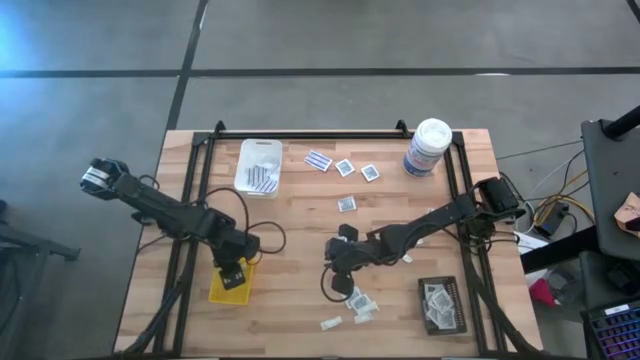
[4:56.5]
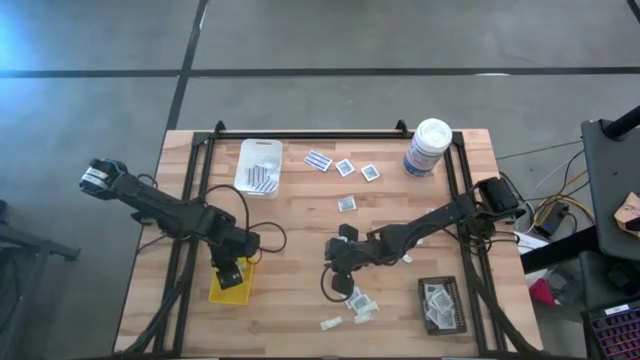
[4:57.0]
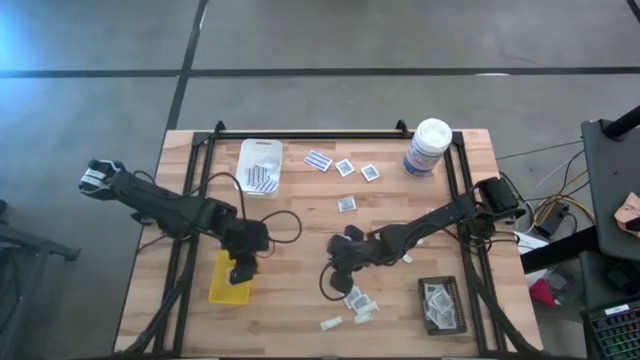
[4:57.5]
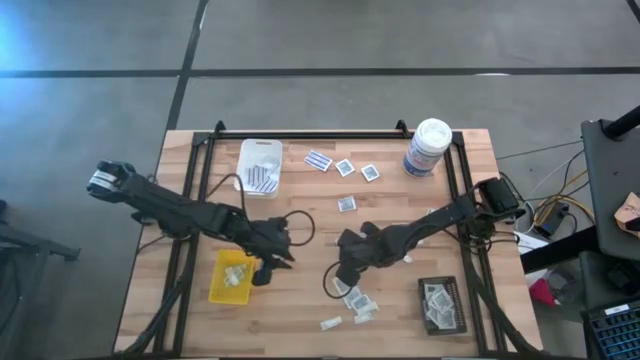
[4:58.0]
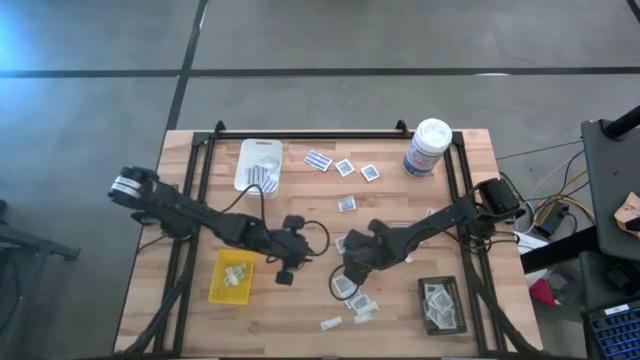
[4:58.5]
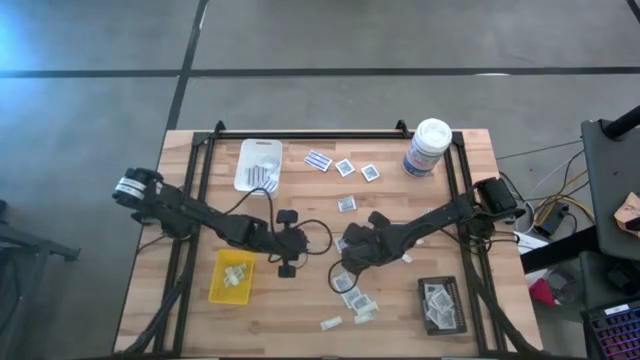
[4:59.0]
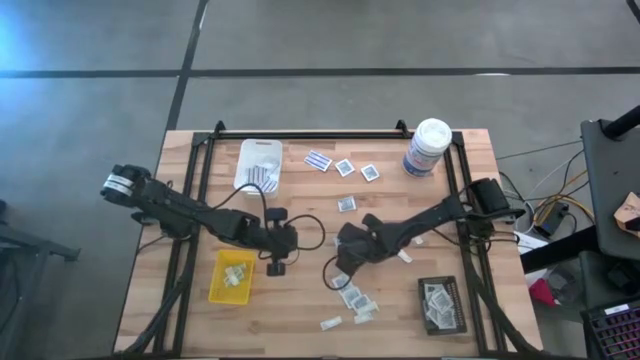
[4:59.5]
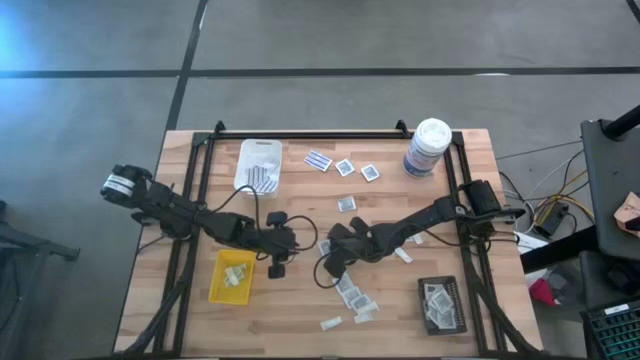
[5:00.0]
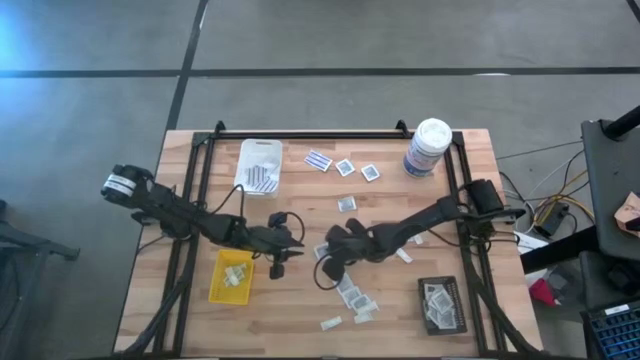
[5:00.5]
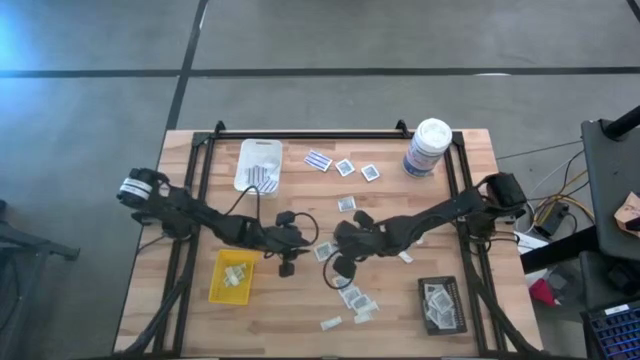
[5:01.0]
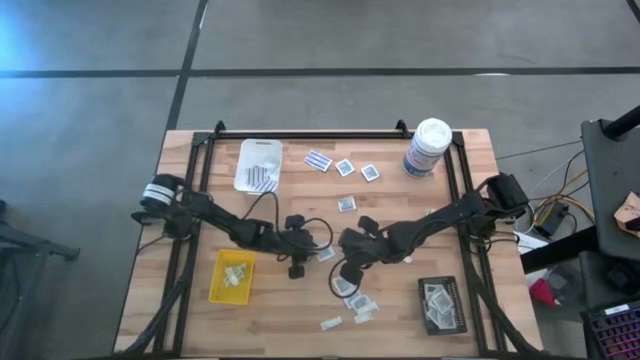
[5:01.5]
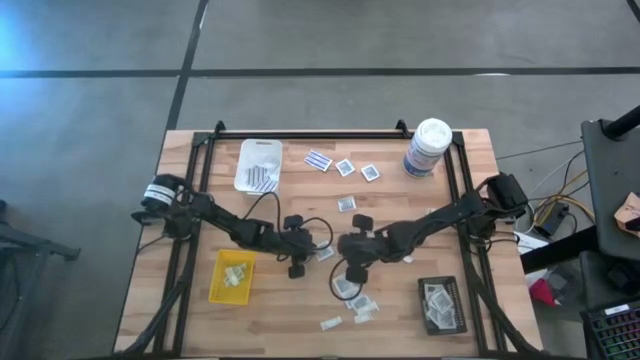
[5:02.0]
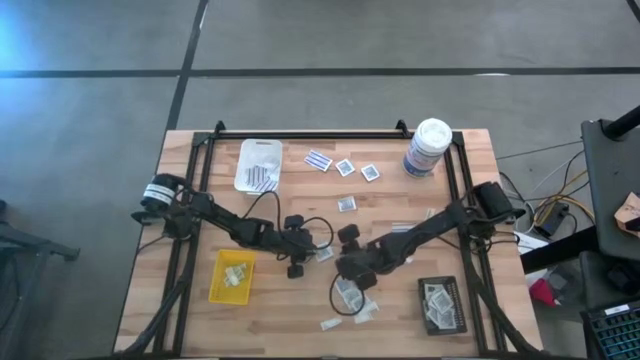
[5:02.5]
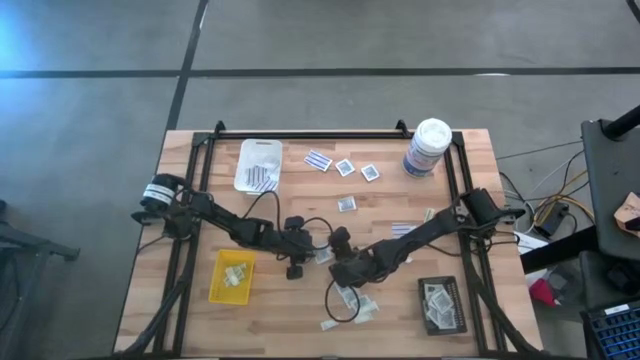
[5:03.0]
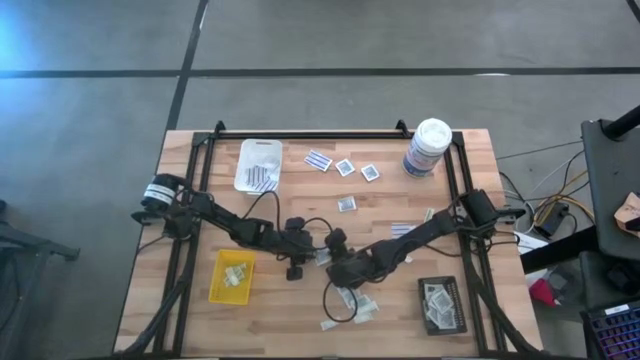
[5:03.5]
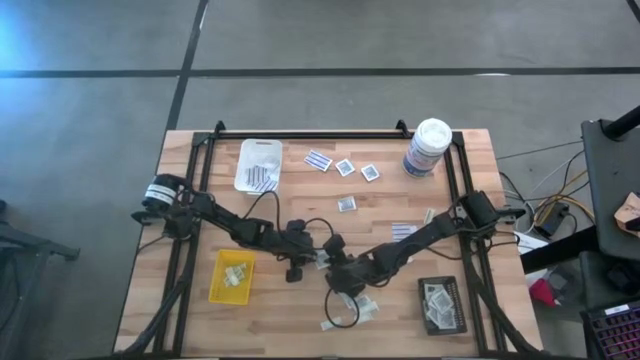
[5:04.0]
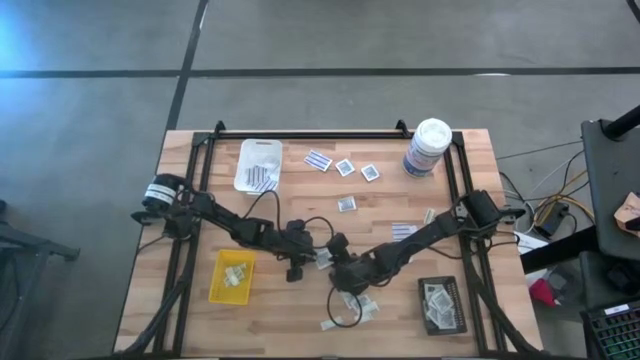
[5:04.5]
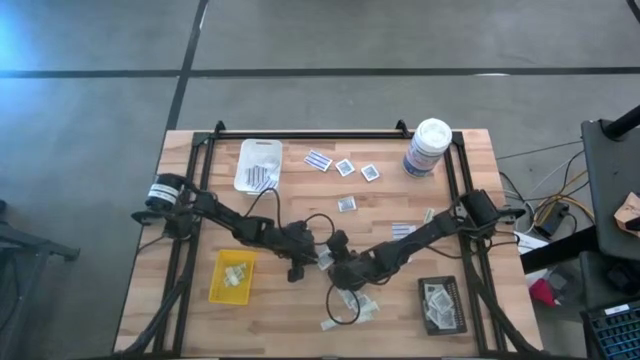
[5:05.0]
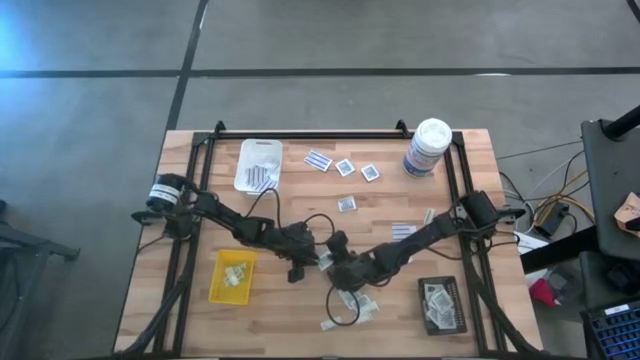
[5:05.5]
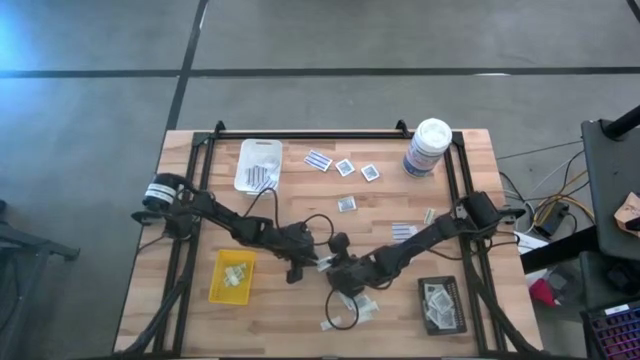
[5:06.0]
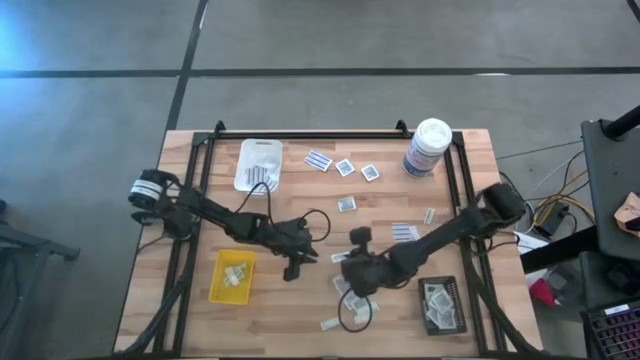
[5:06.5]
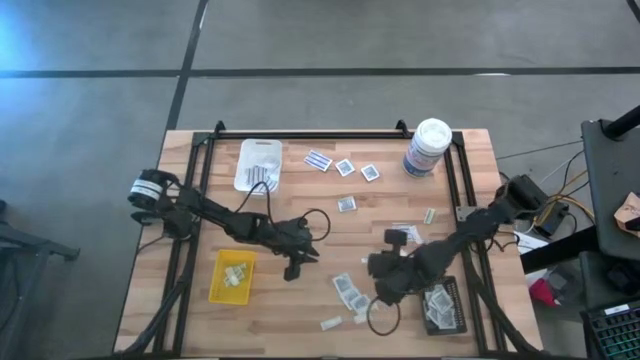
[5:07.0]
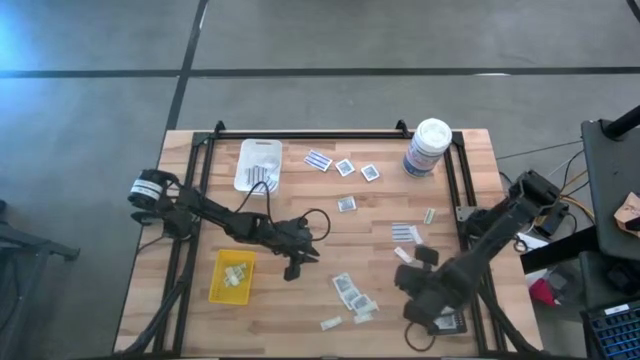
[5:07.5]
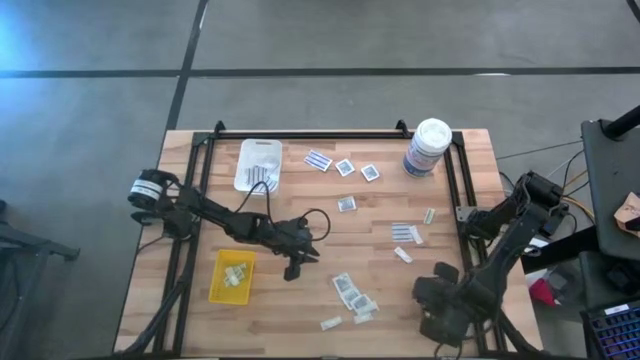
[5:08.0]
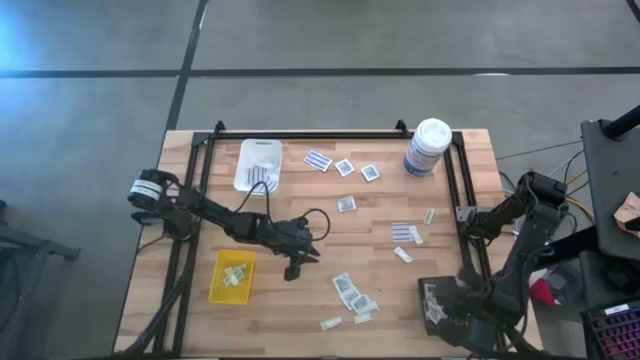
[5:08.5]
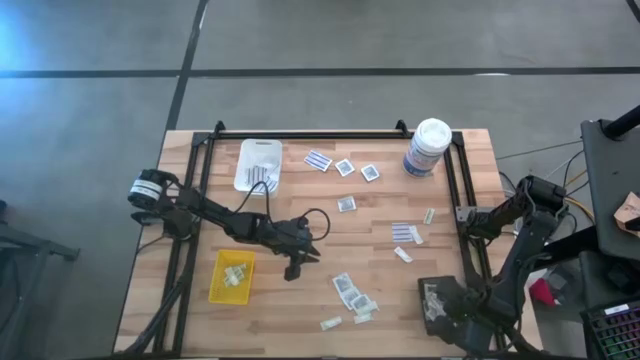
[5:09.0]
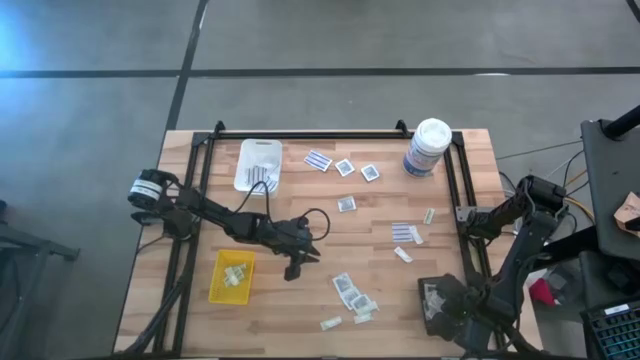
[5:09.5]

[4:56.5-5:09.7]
Task: Pick & Place First Aid Supplies
Put the towelette pack into the black bin

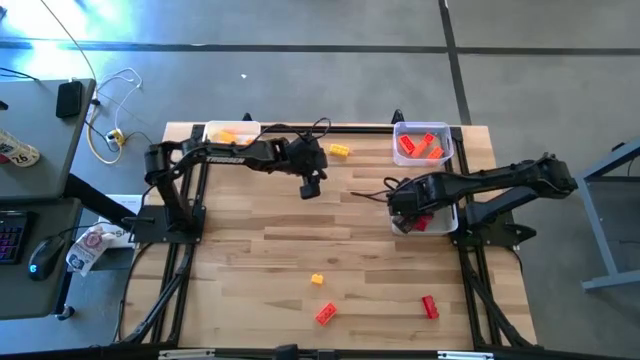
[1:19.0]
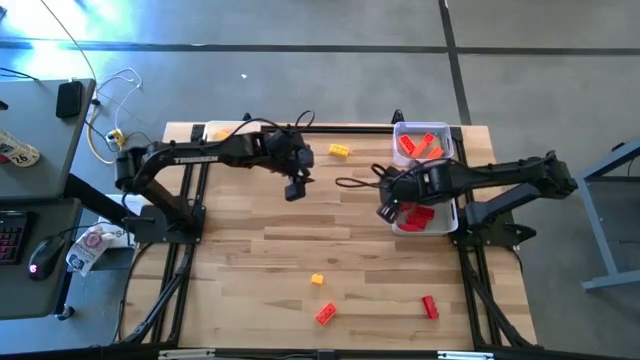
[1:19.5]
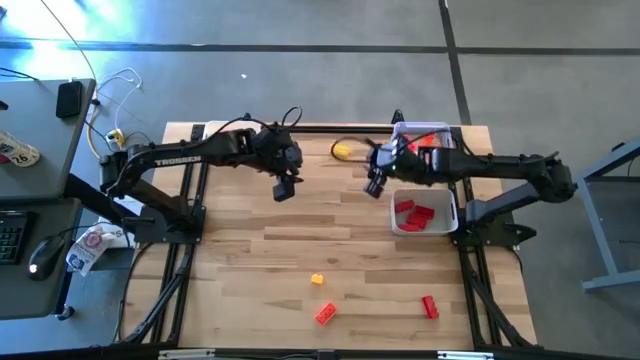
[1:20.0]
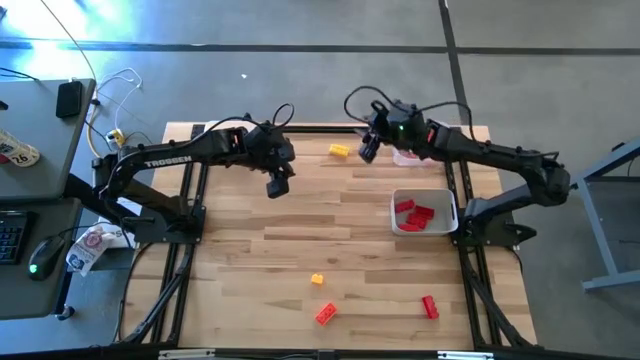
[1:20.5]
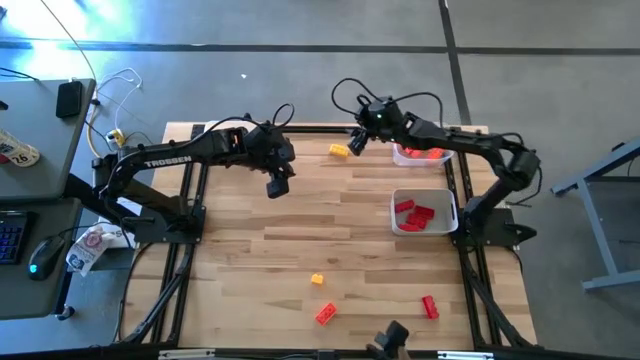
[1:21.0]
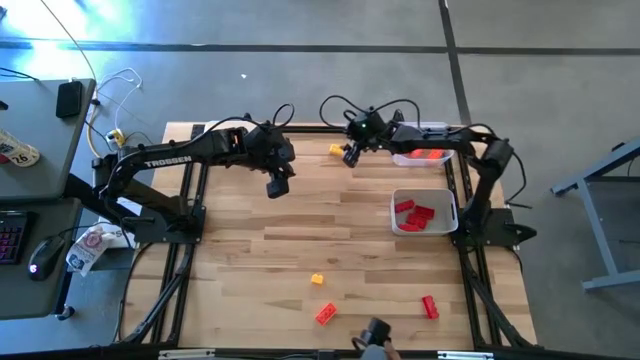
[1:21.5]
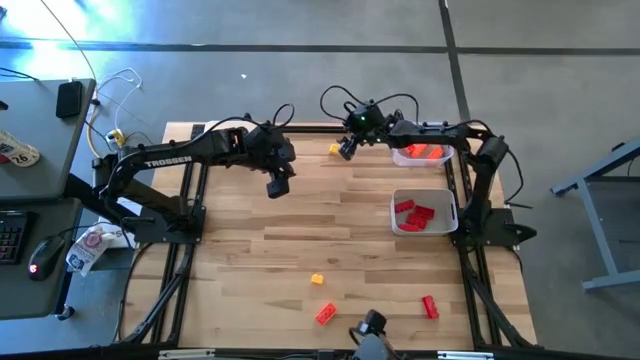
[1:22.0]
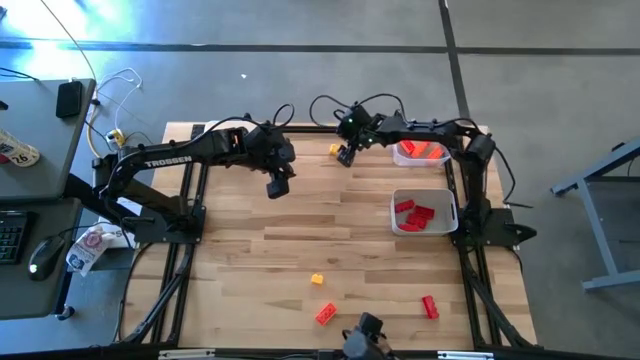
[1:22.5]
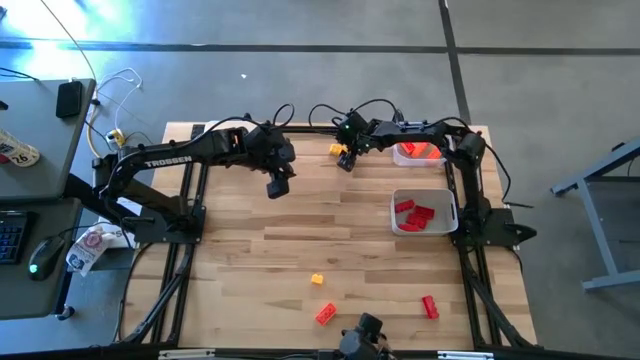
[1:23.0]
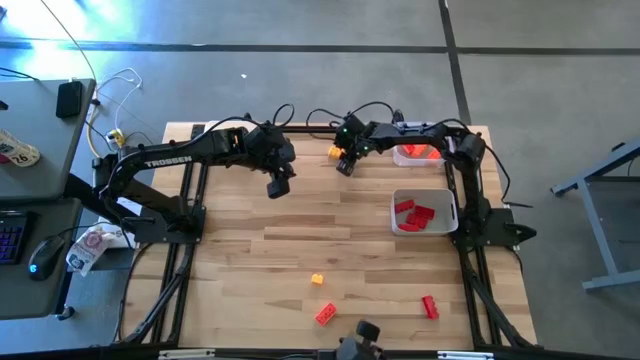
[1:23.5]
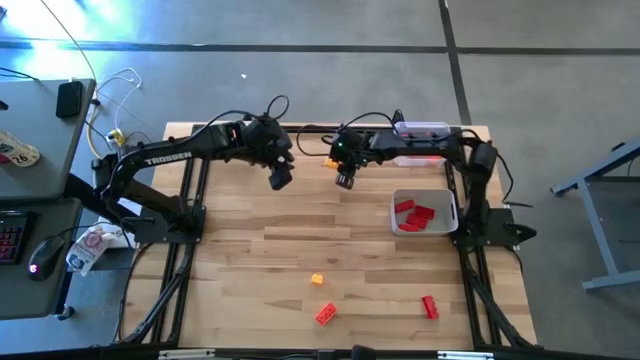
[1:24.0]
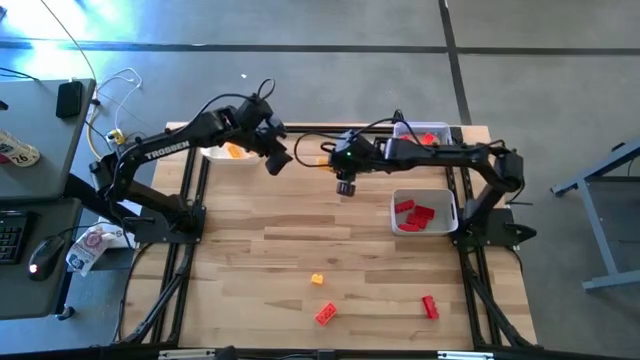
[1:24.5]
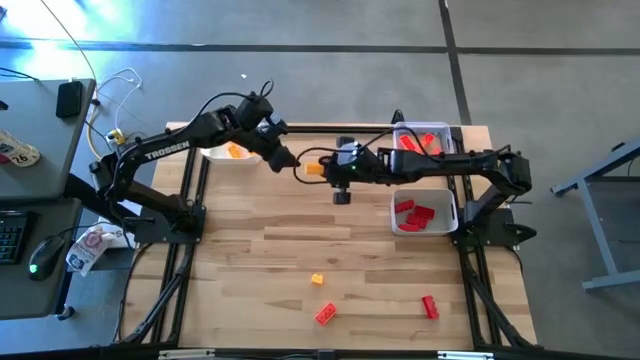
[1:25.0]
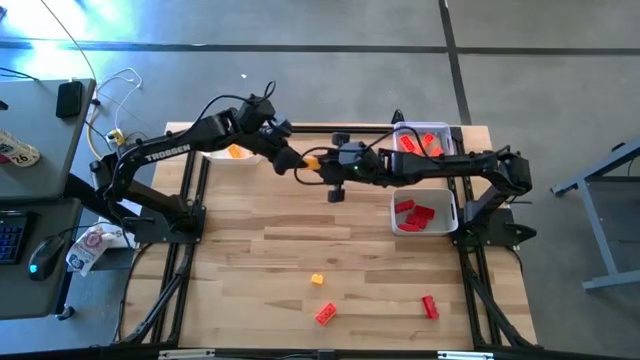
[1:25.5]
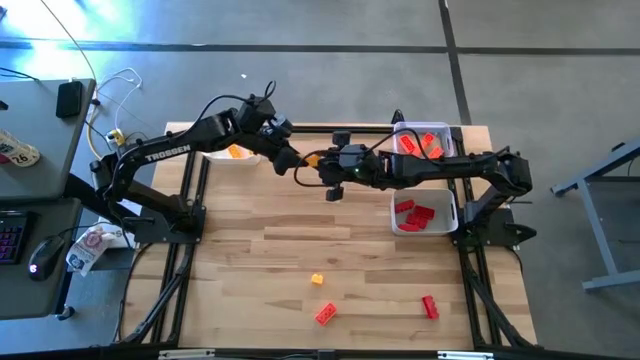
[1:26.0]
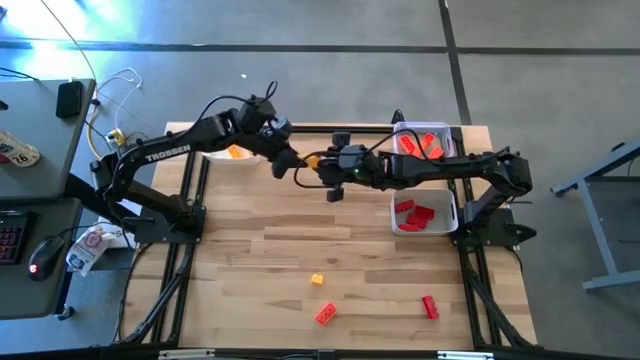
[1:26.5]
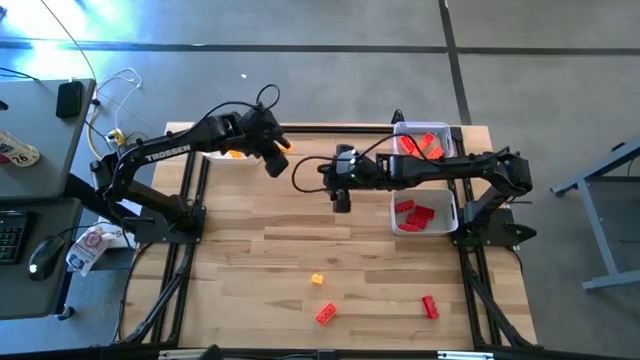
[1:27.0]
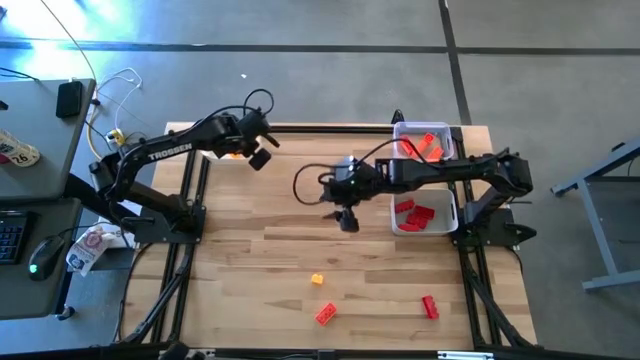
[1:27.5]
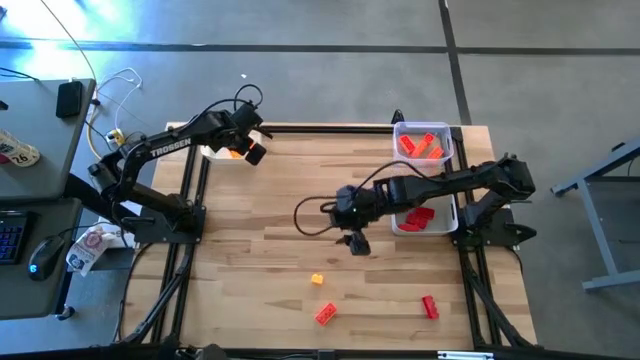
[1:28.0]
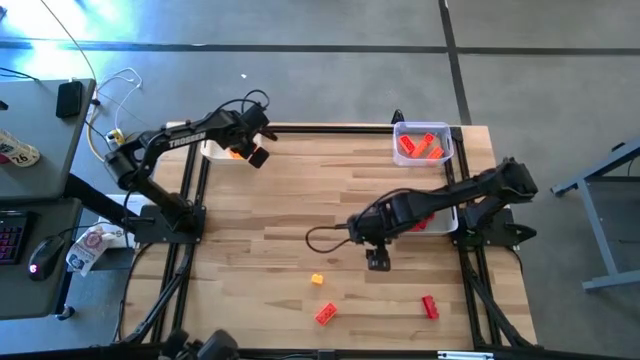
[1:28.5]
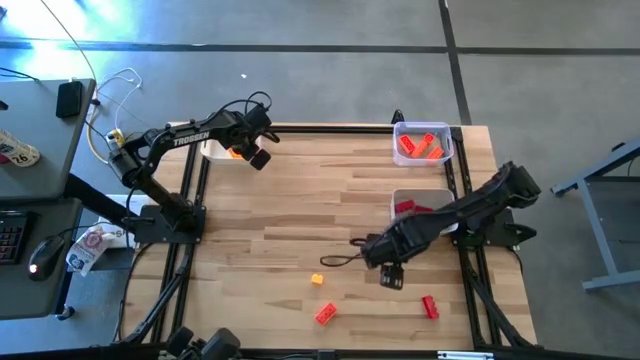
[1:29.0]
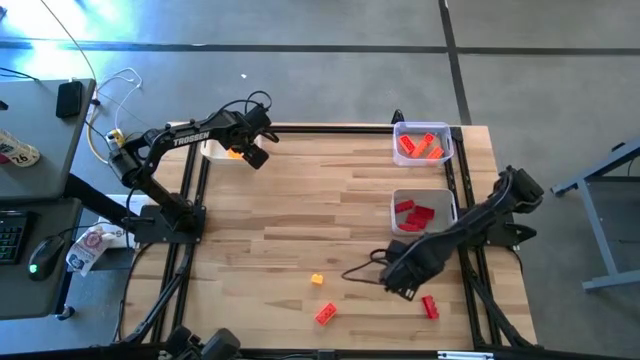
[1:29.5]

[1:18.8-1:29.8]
Task: Sort & place blocks by color
Put the yellow game piece into the white bin
